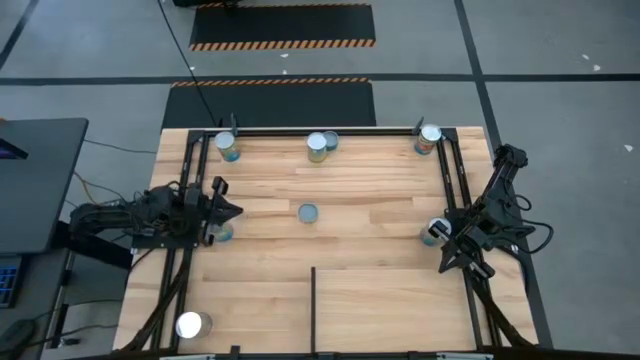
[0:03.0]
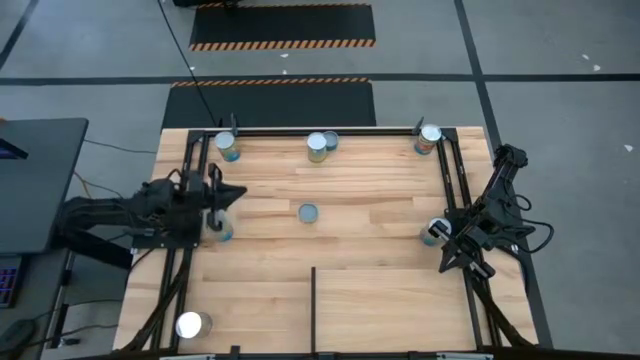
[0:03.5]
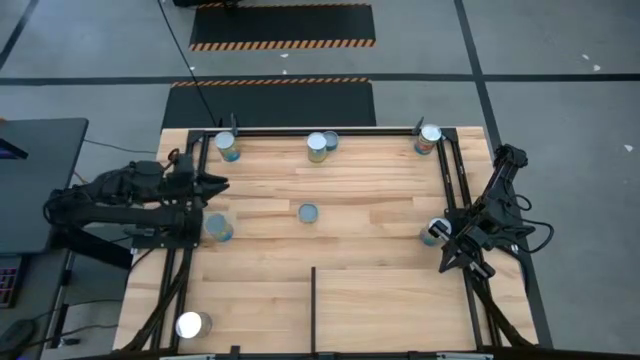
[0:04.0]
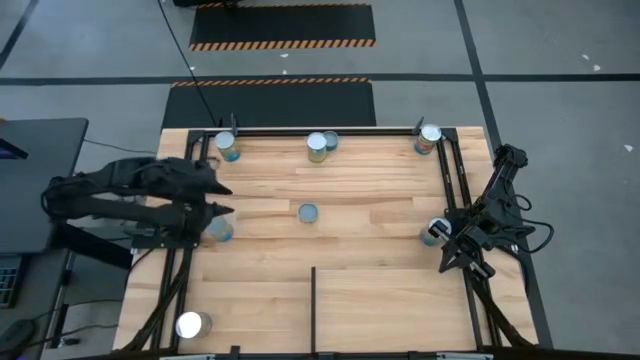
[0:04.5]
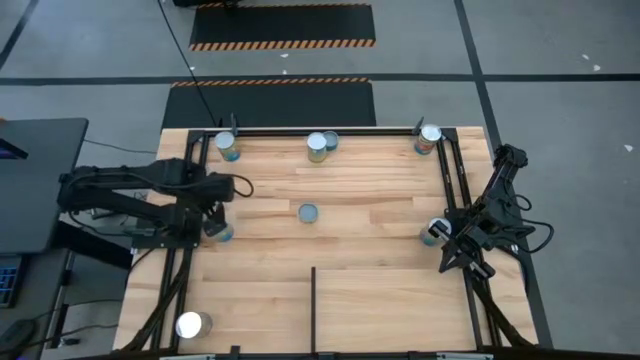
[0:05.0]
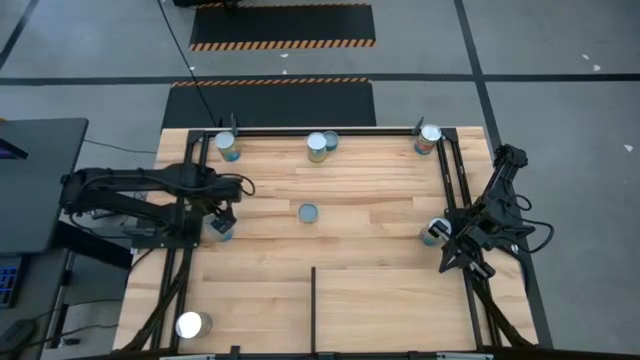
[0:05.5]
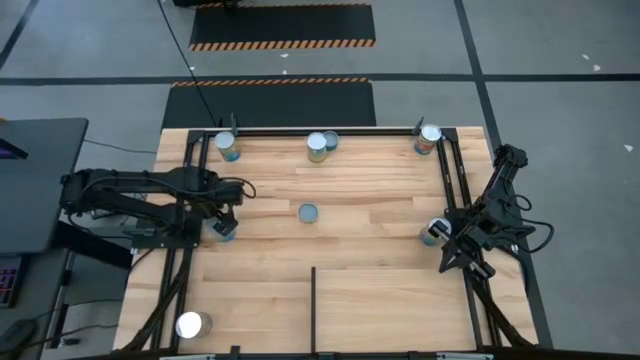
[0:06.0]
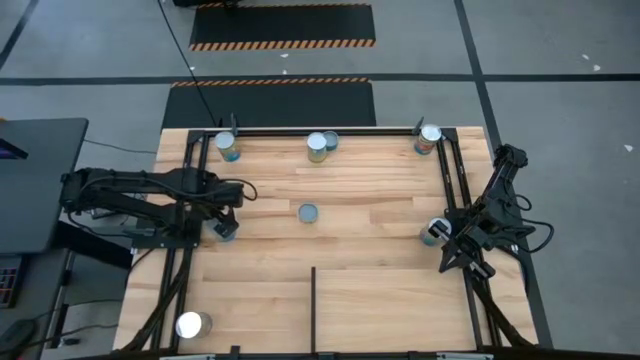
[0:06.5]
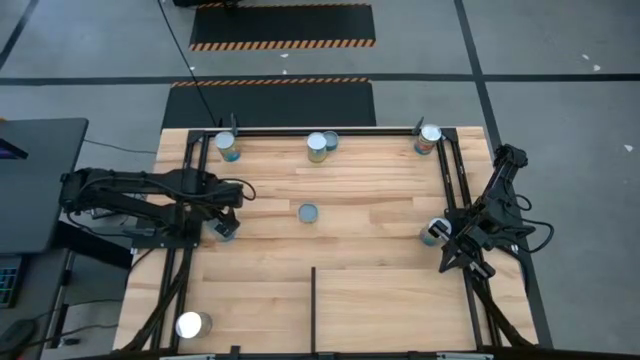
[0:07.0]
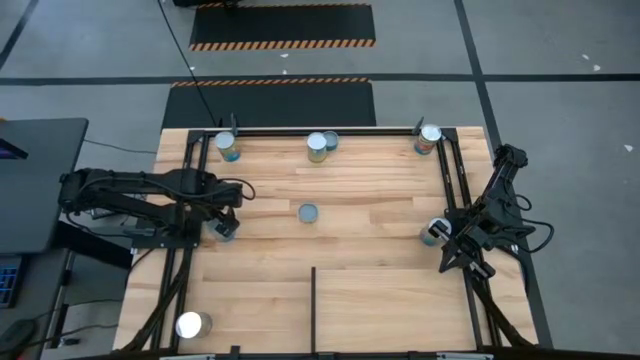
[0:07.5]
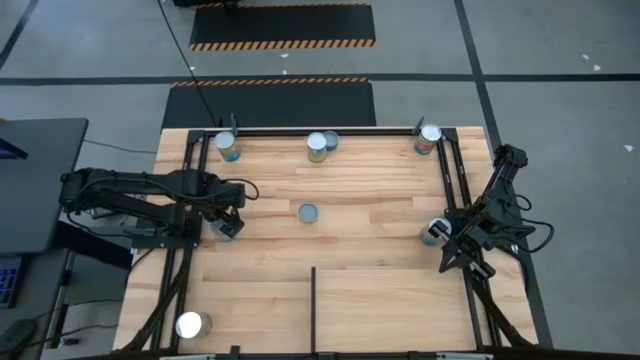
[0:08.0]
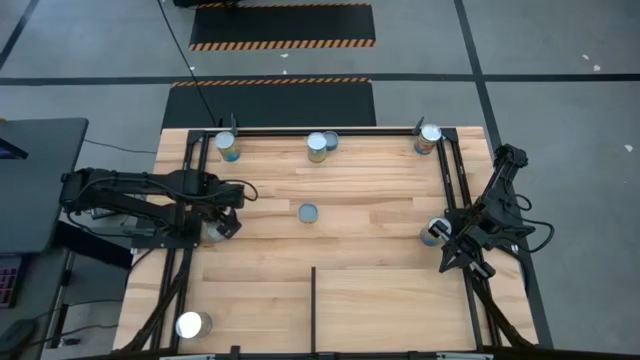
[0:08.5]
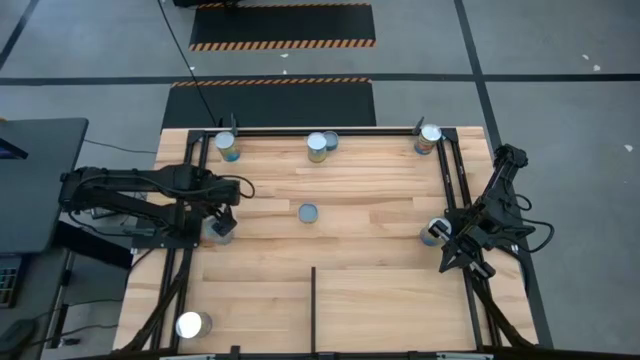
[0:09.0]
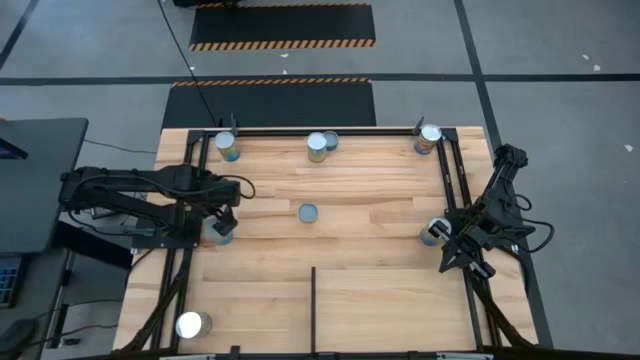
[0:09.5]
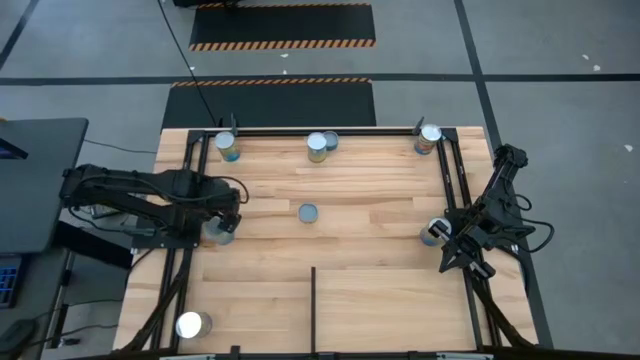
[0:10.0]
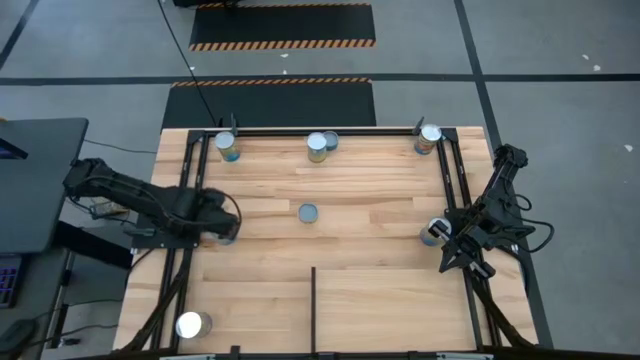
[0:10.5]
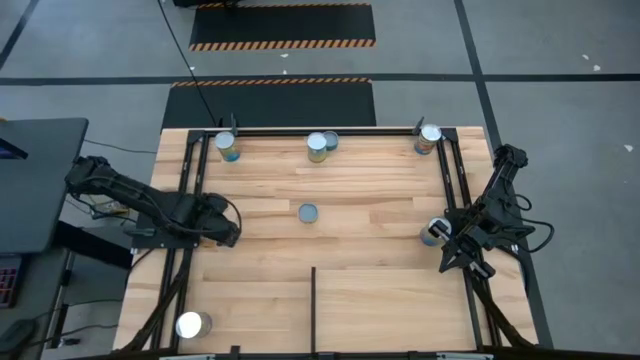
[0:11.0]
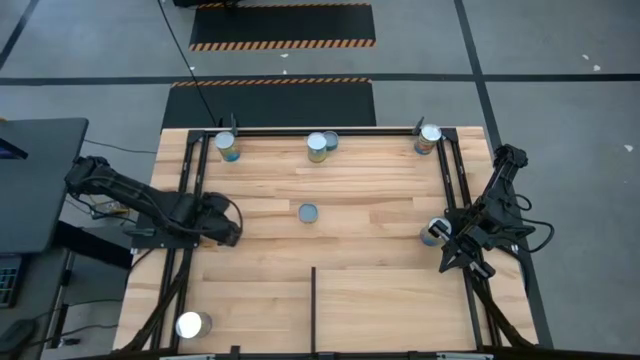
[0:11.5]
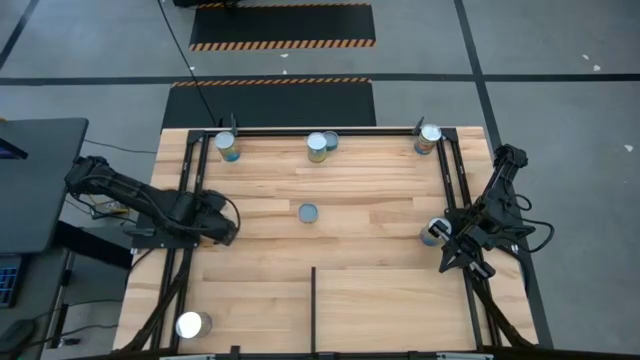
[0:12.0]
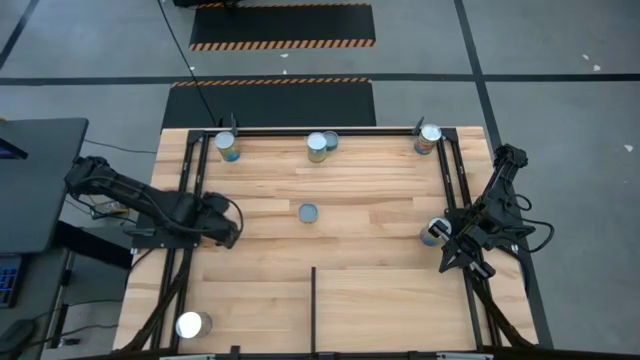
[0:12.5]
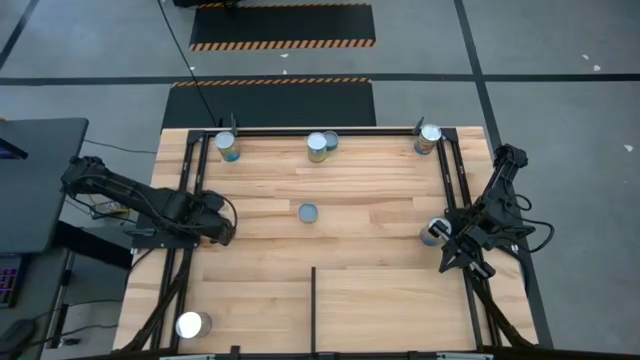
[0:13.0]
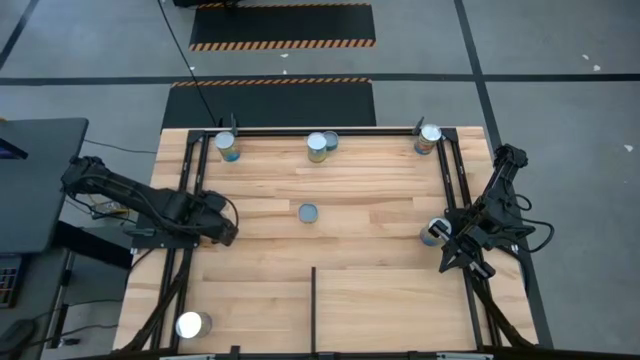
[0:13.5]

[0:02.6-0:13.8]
Task: Pick and place cans onto a shelf
Put the left canned cherries on the shelf

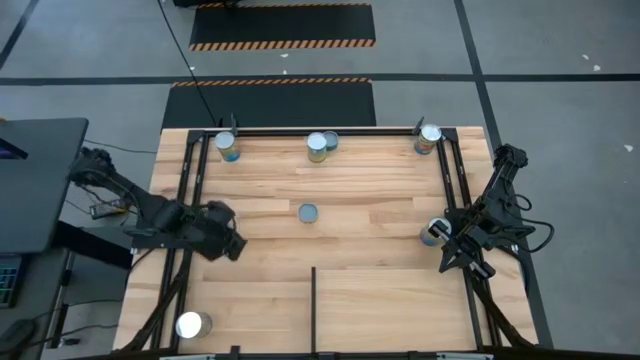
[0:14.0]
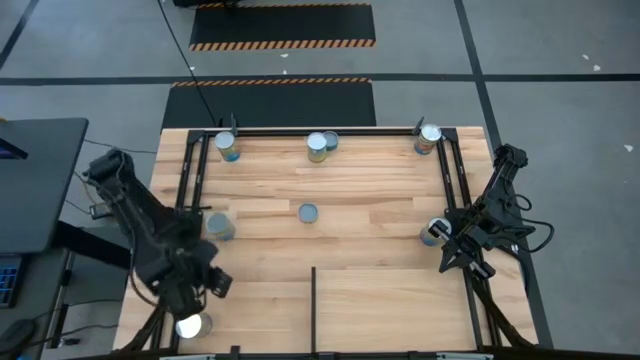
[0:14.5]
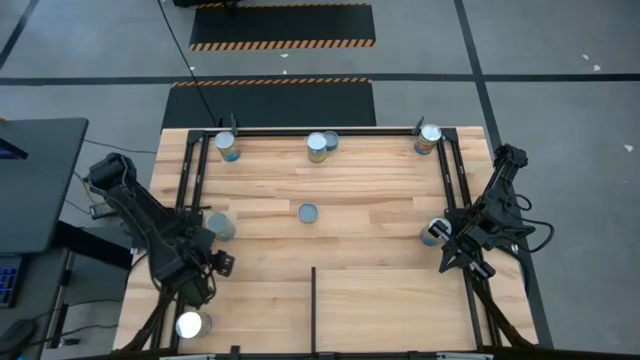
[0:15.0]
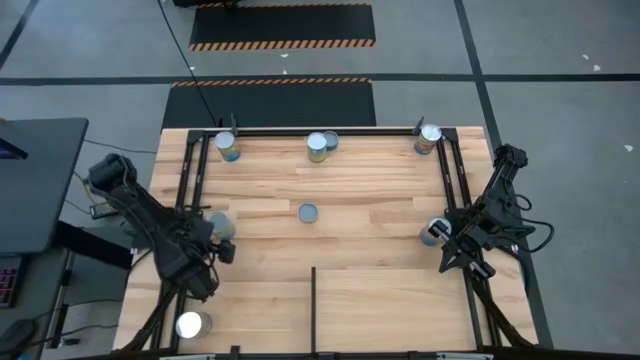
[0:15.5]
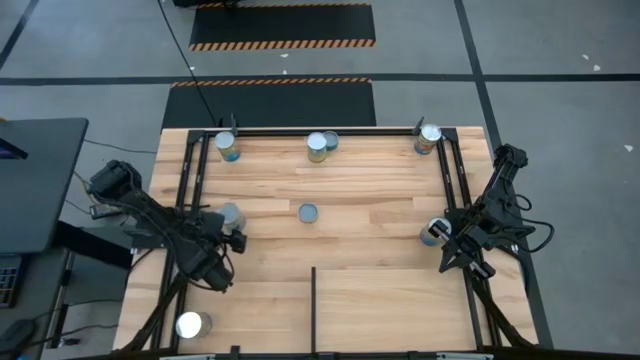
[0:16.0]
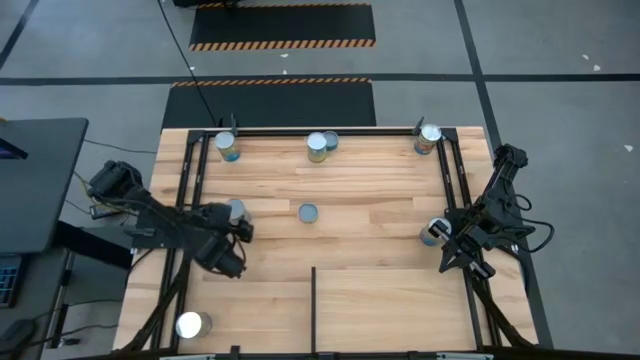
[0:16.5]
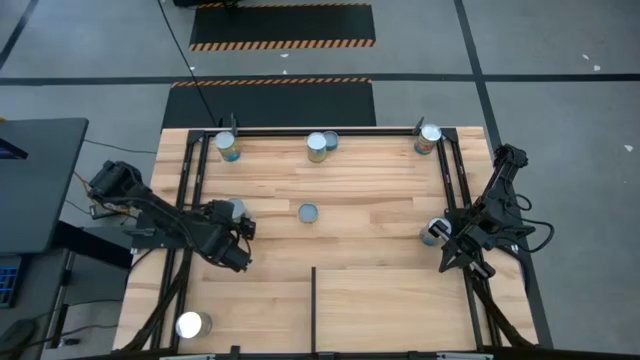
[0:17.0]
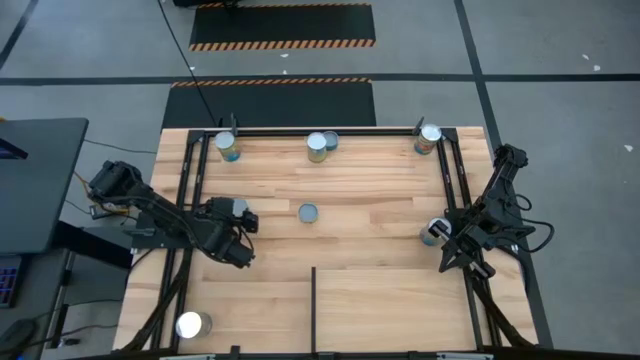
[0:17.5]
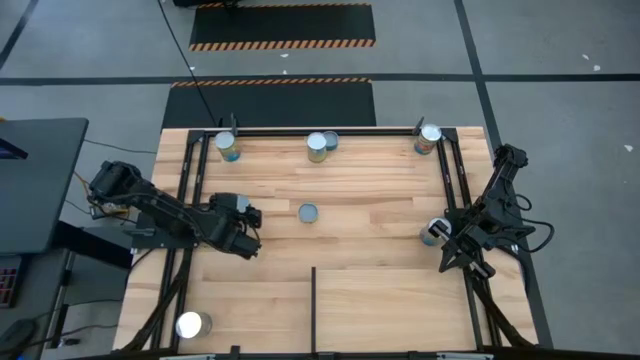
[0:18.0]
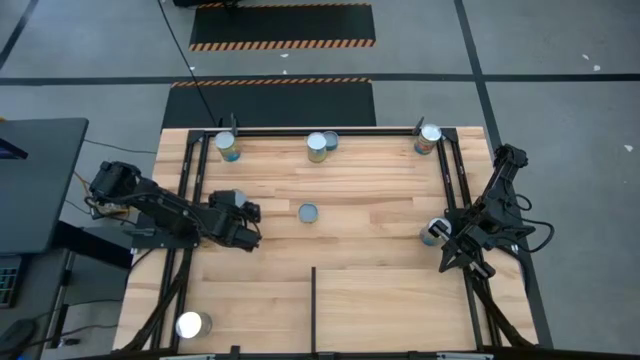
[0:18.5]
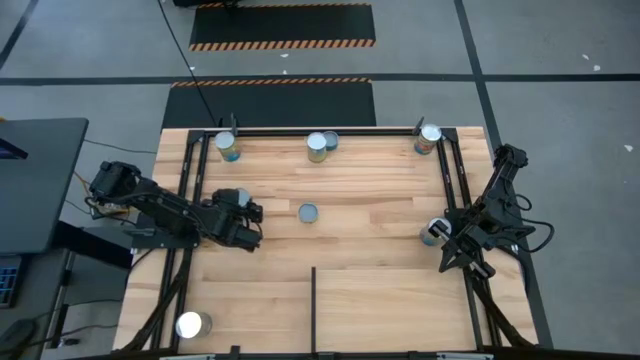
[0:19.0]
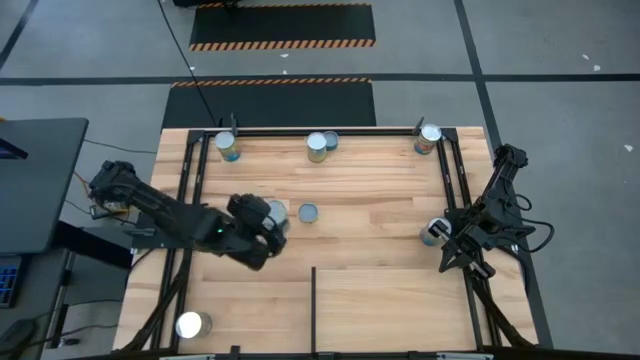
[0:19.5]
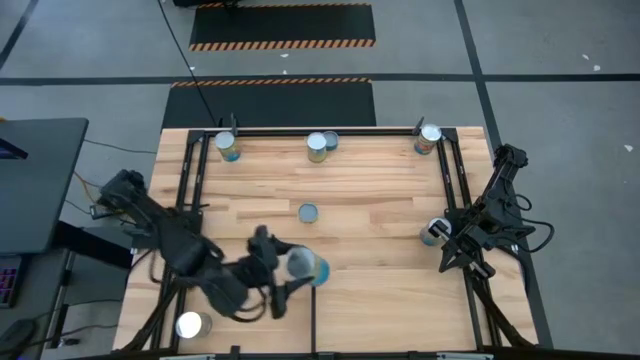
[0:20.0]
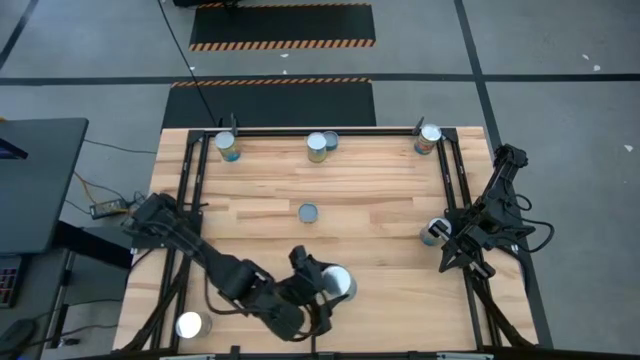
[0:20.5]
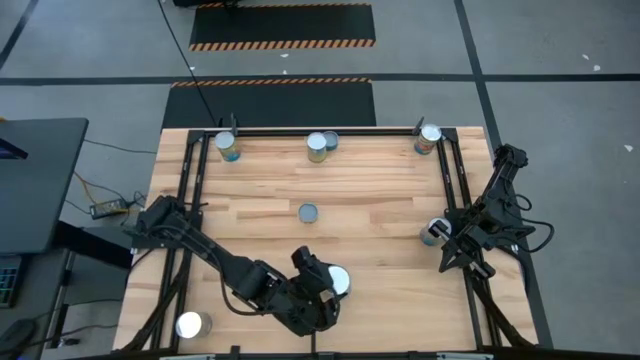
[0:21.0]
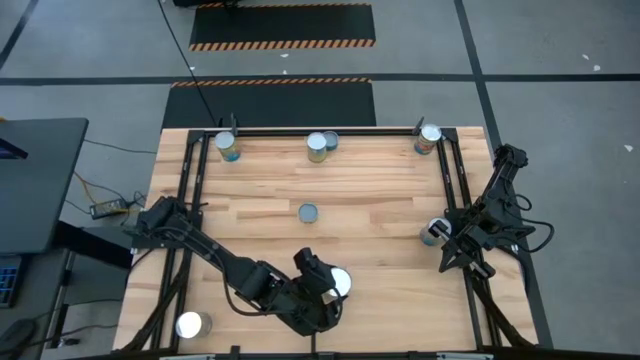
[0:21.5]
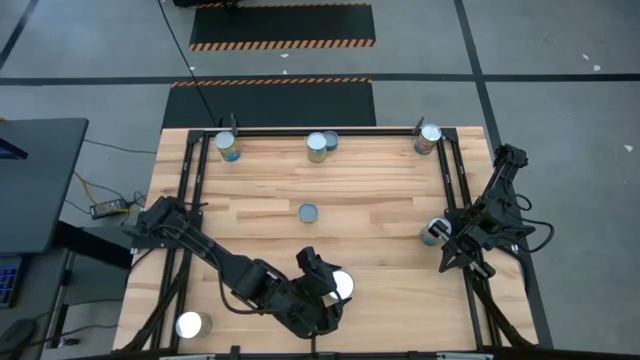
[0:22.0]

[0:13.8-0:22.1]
Put the left canned cherries on the shelf
